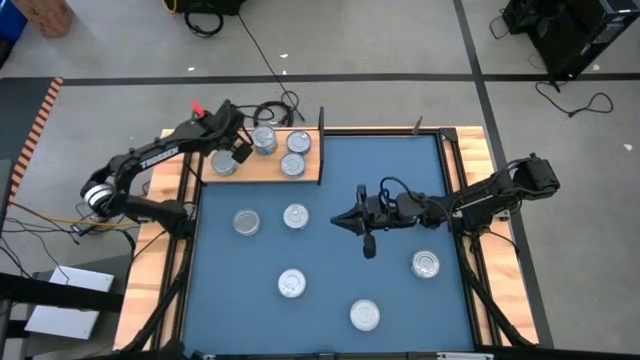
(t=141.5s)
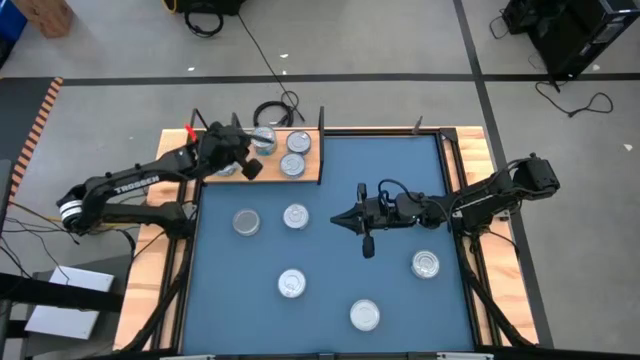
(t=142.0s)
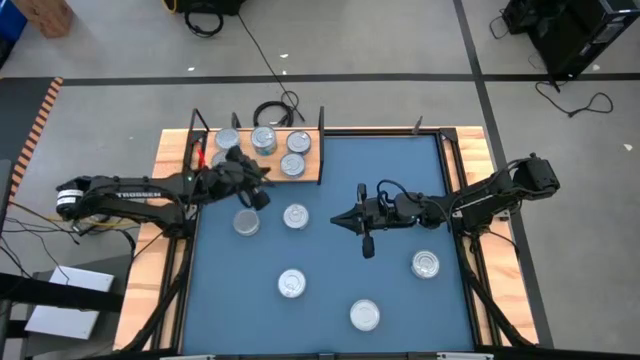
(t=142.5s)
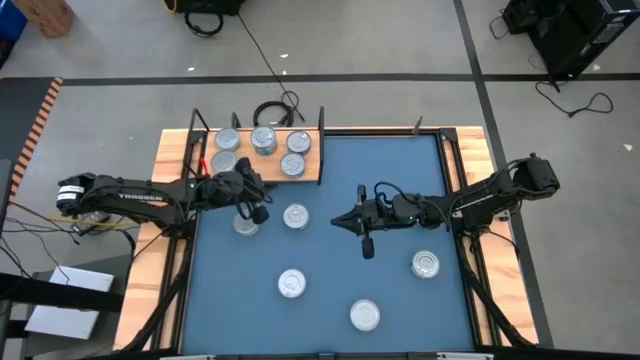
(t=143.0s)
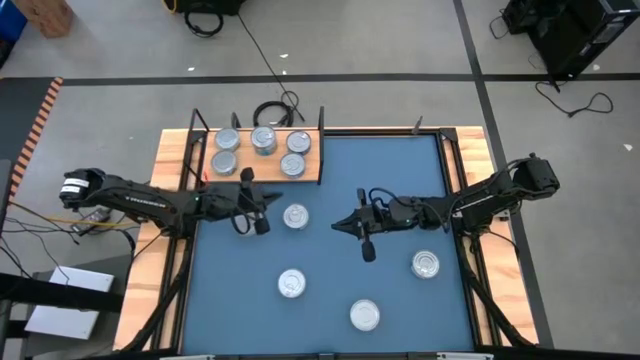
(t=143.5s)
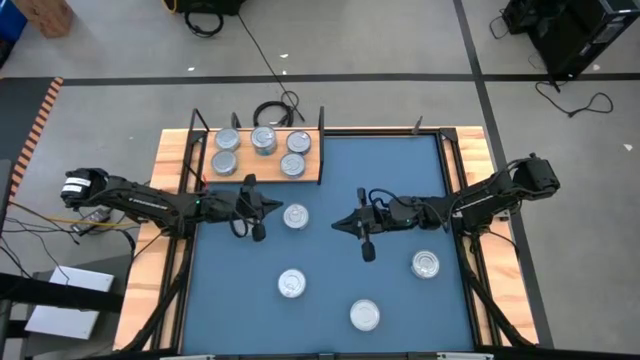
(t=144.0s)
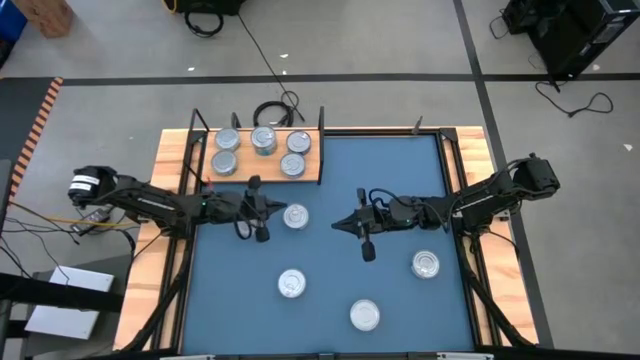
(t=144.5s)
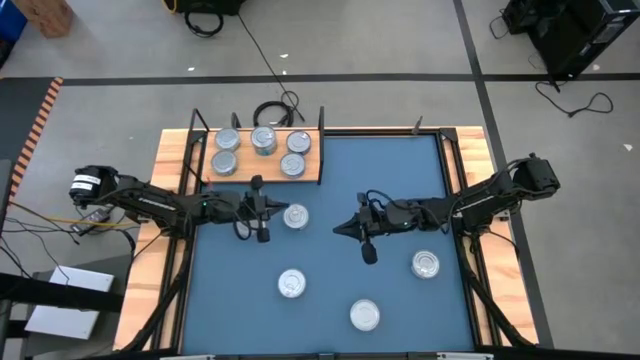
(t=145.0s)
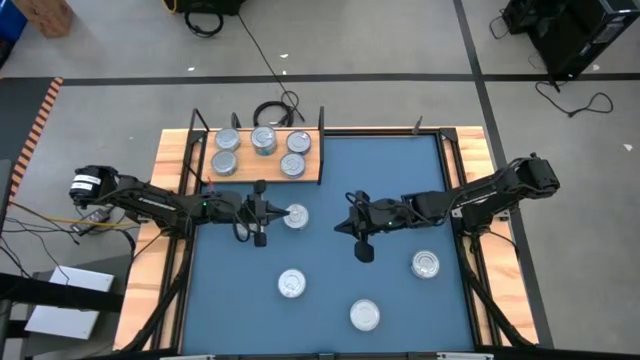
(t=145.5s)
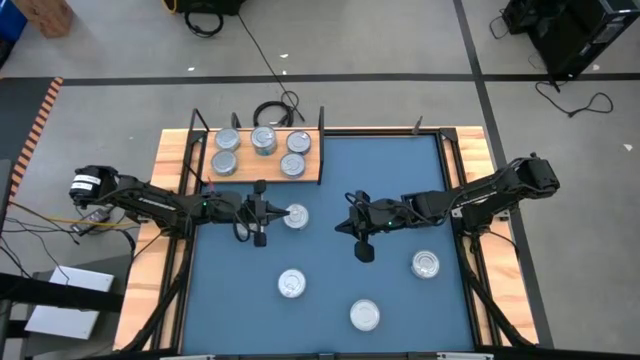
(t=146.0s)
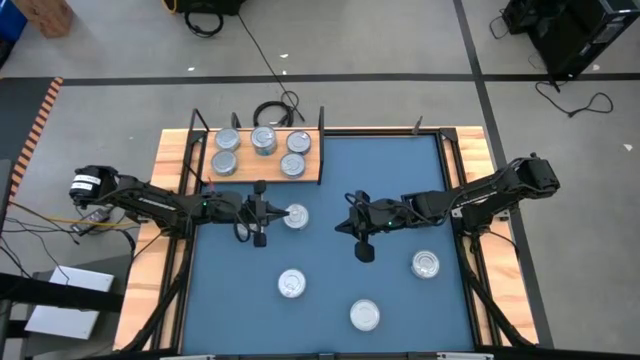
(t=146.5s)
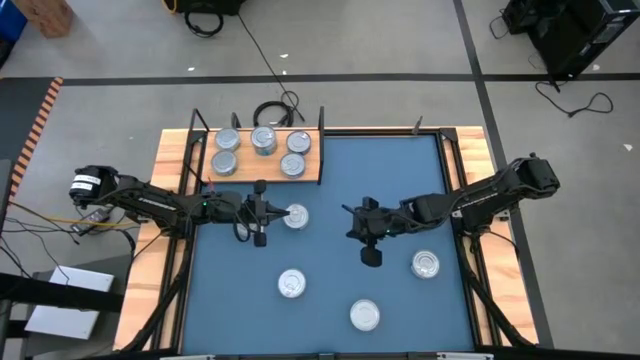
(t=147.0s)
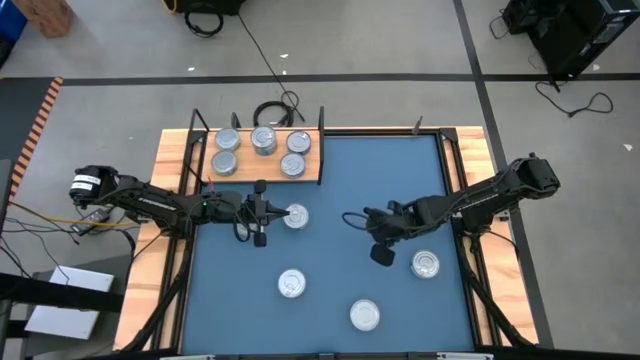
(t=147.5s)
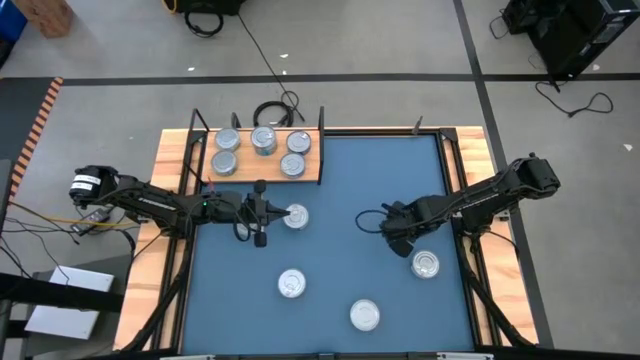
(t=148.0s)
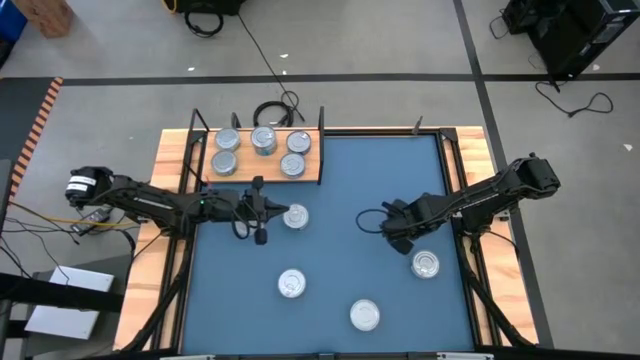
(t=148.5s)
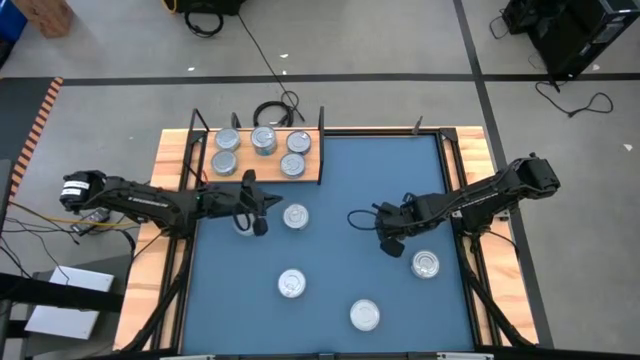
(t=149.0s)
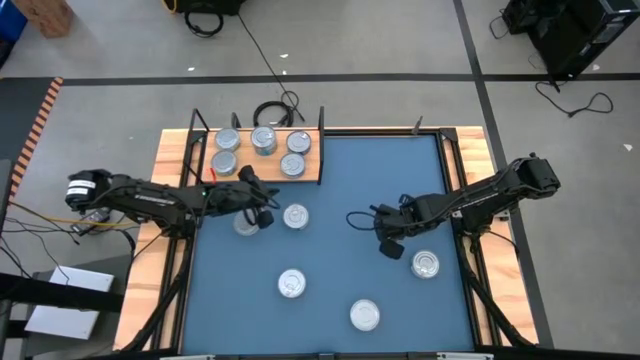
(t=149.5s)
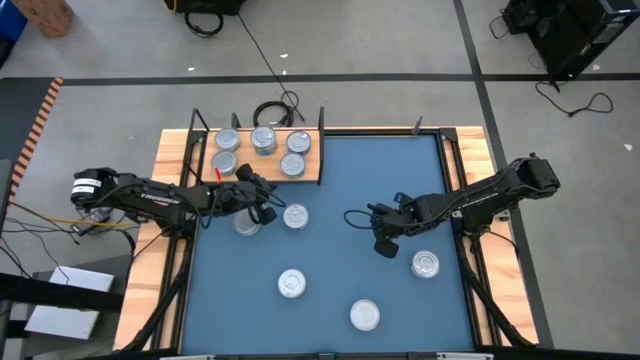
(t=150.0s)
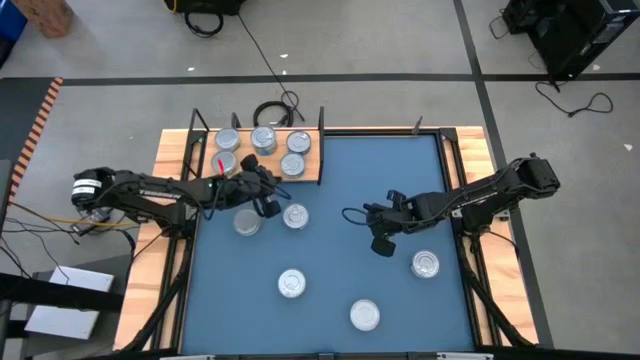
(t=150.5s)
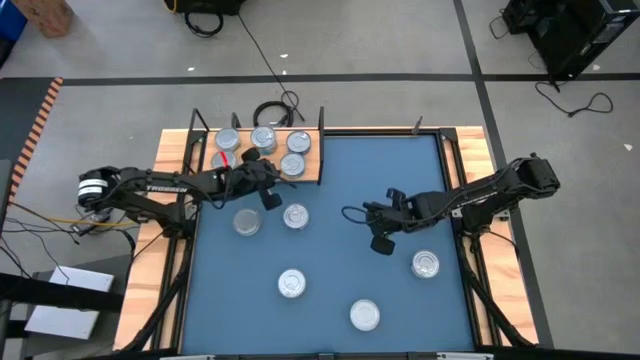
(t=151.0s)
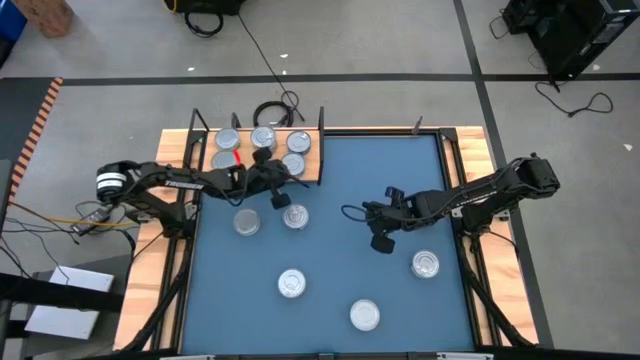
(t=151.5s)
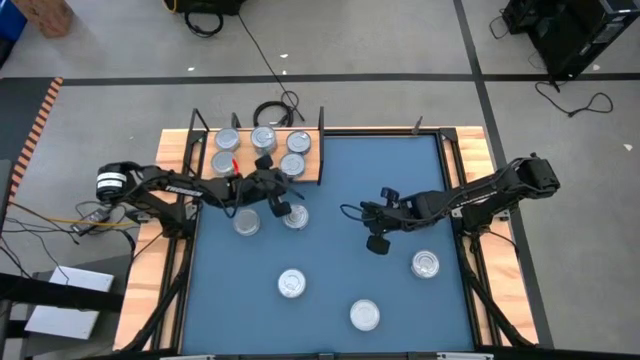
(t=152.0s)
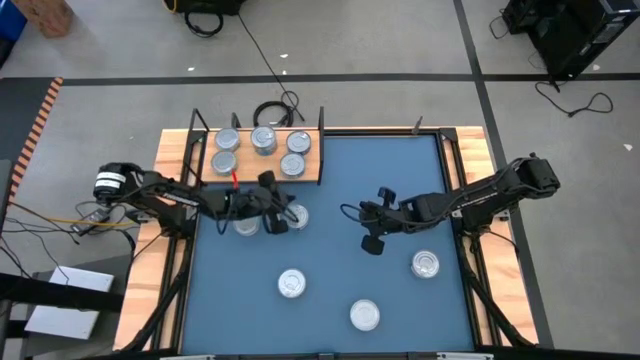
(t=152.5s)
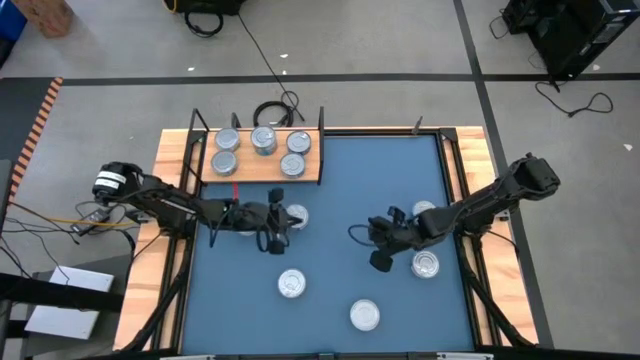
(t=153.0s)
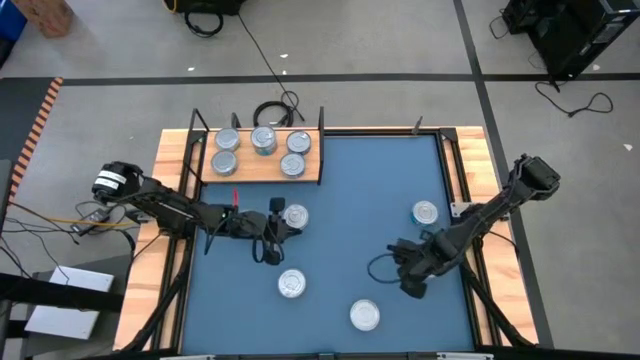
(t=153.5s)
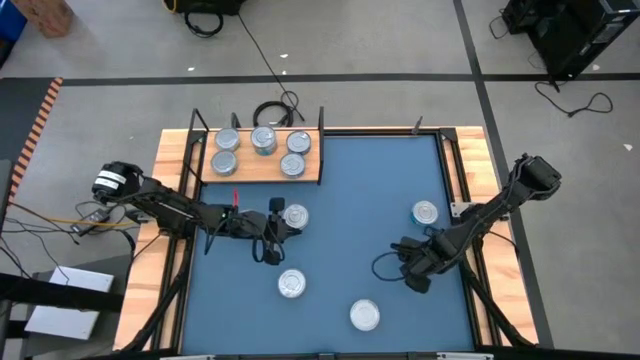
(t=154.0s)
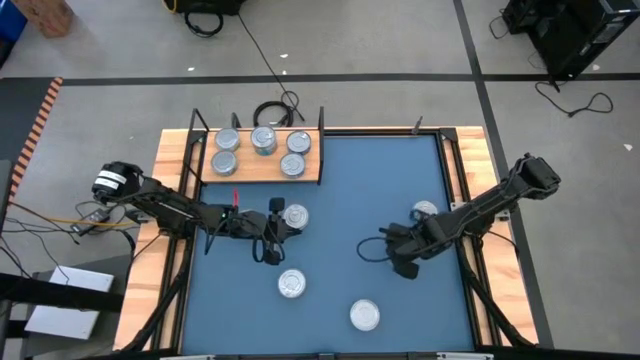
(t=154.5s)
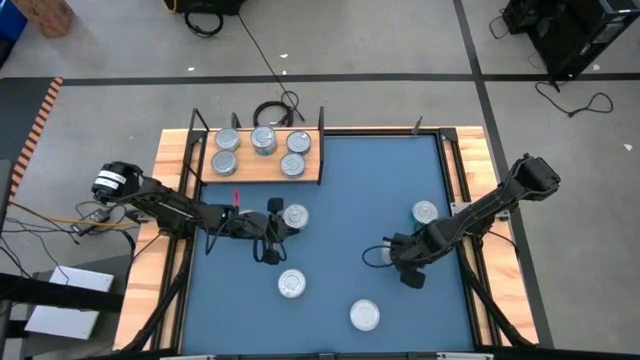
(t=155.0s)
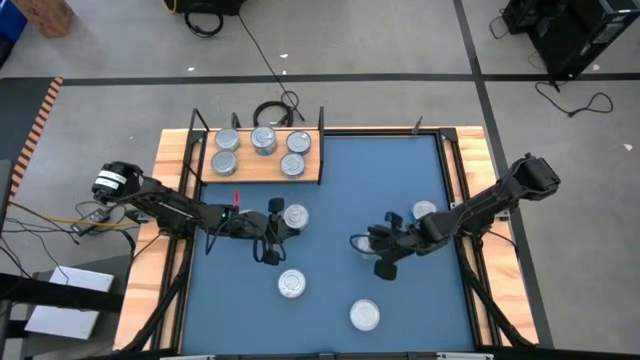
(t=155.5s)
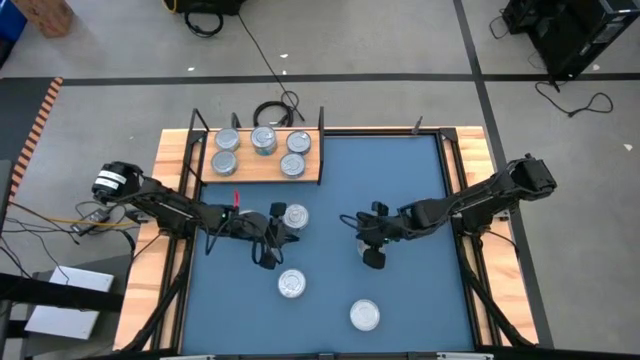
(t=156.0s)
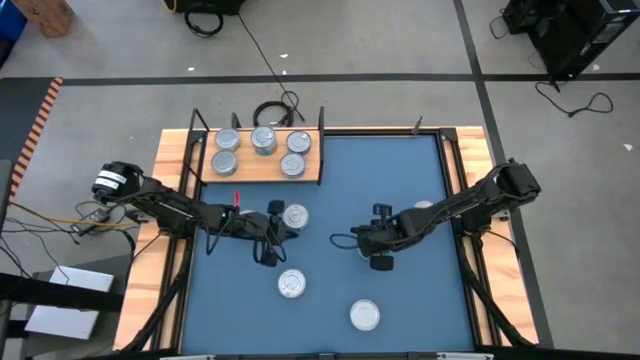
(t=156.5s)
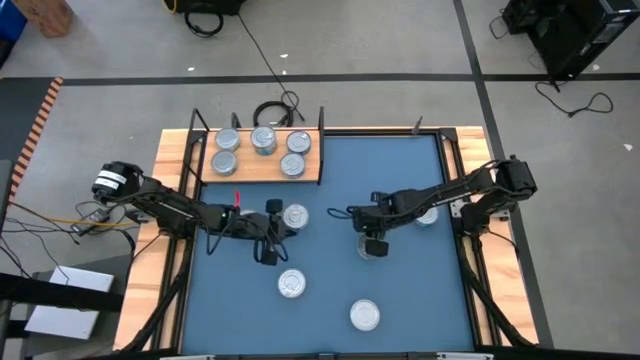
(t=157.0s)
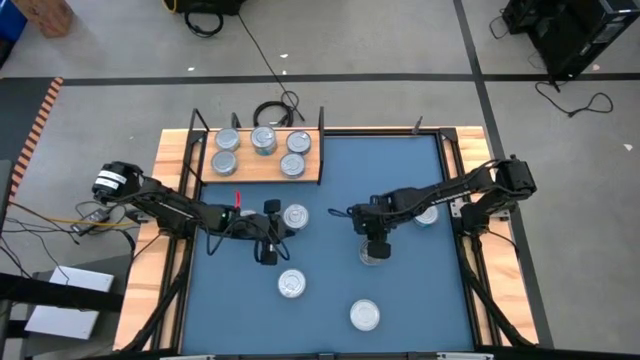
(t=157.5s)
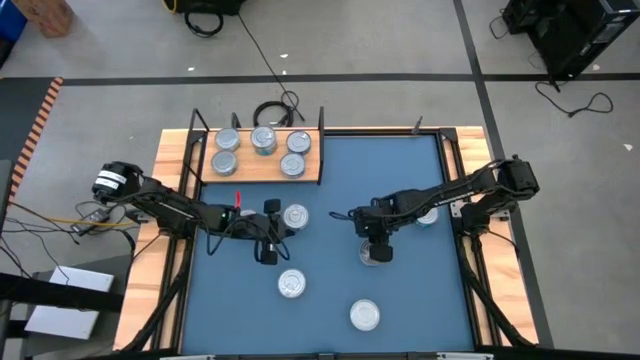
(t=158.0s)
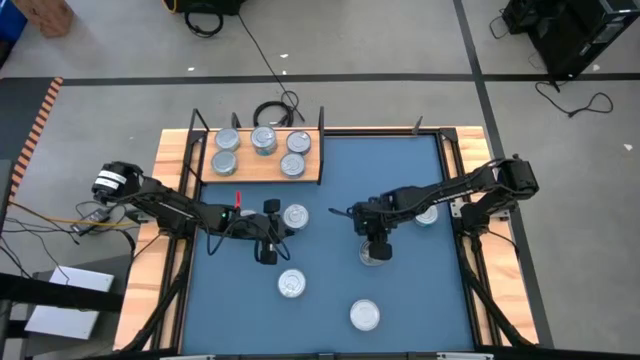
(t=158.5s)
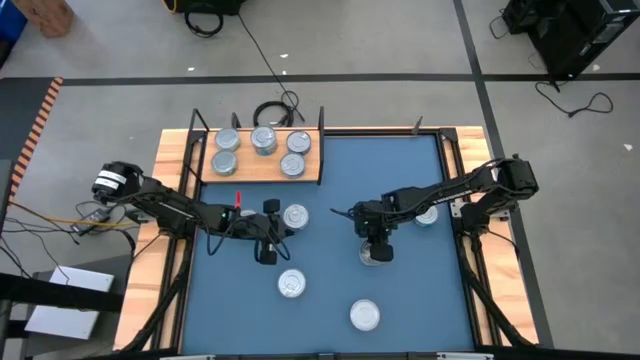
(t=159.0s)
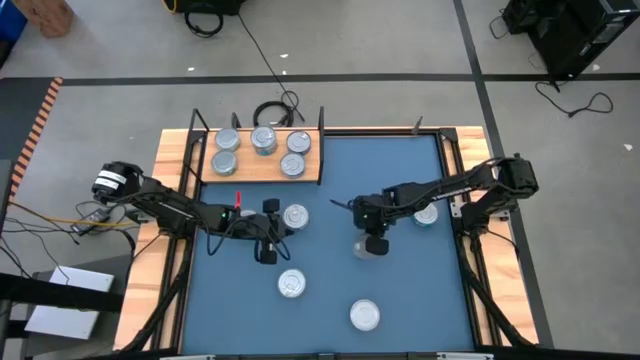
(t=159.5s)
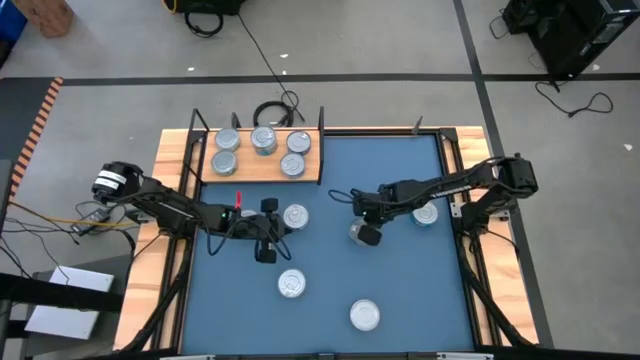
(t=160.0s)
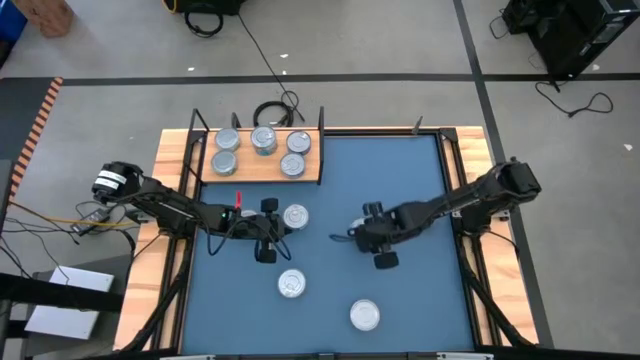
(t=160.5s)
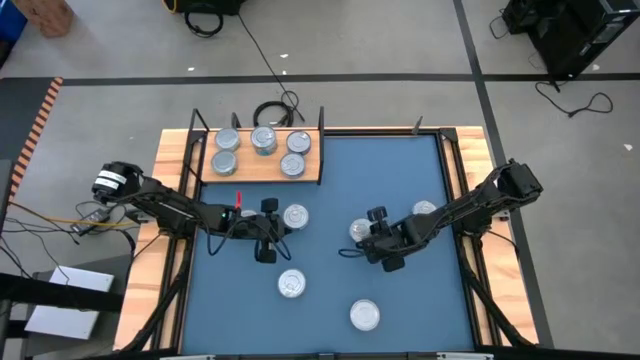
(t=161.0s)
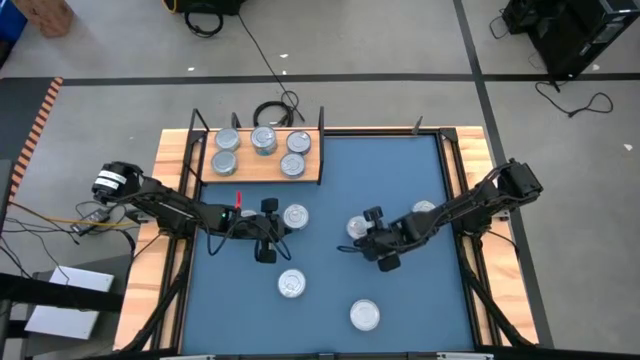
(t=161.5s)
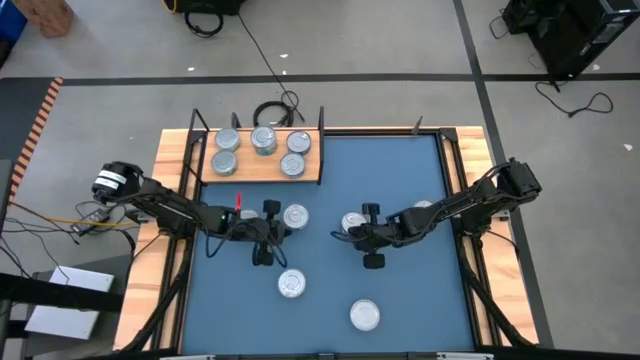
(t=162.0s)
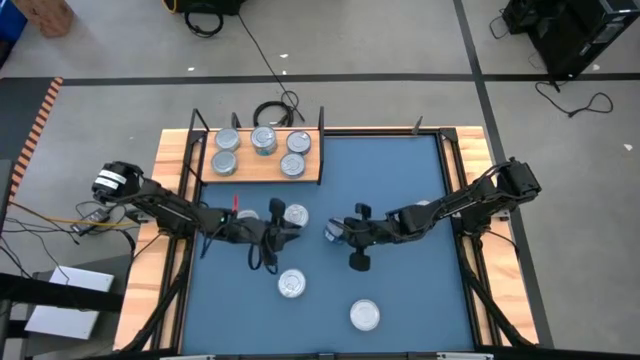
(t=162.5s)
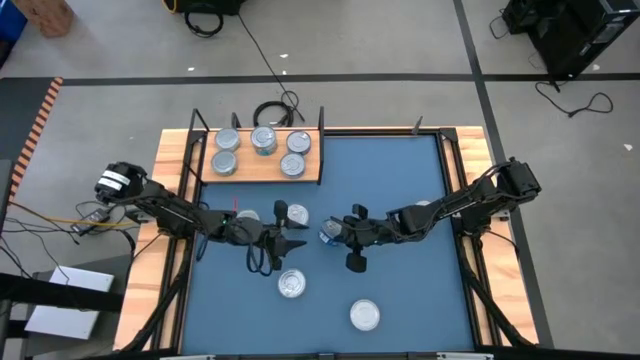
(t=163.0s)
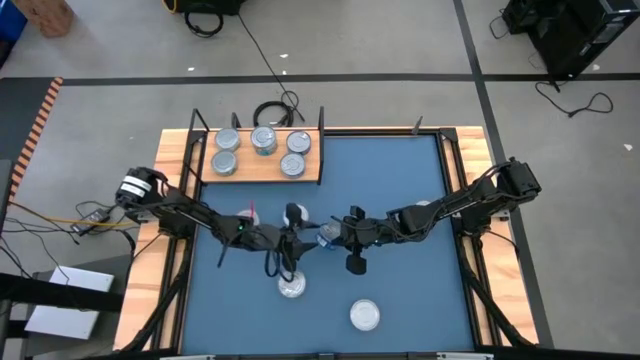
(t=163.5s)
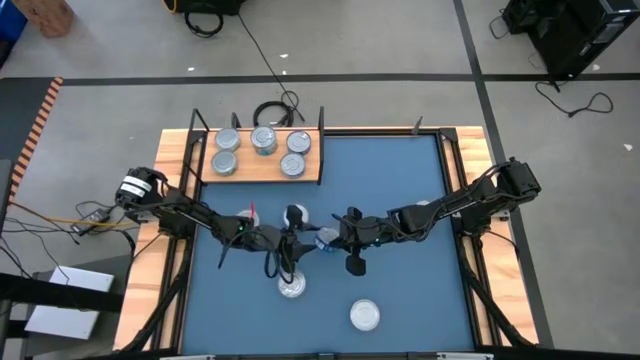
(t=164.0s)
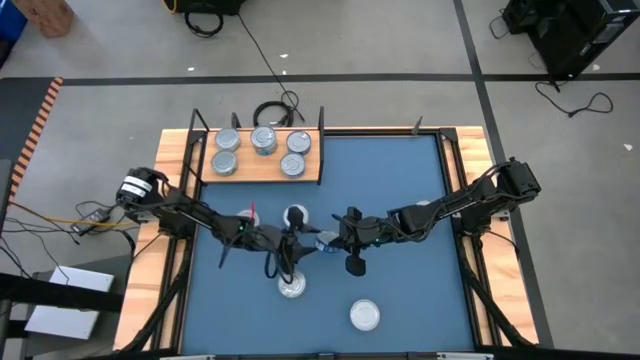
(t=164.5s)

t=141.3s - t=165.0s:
Task: Stack canned seafood by type on shelf
Stack the blue tuna can on top of the other blue tuna can on the shelf
